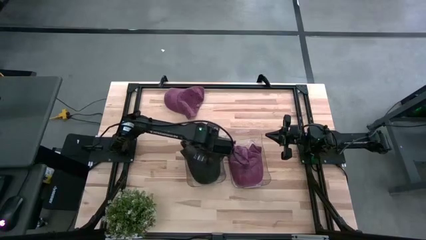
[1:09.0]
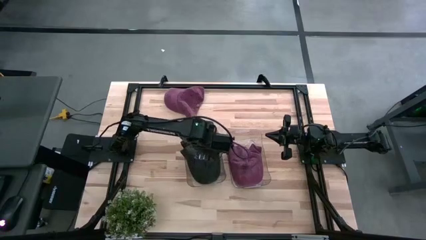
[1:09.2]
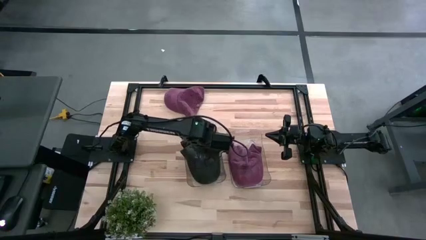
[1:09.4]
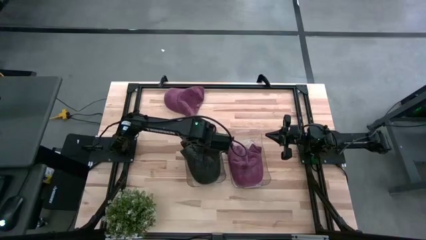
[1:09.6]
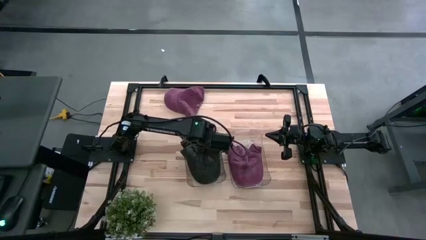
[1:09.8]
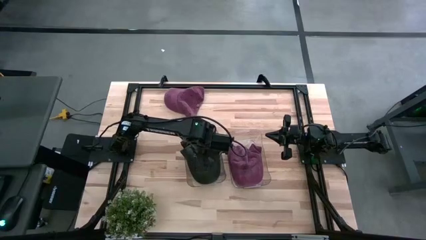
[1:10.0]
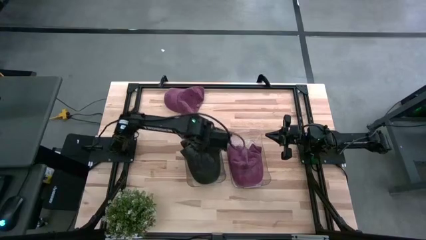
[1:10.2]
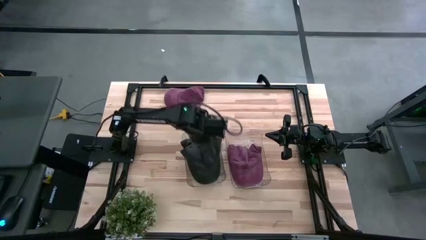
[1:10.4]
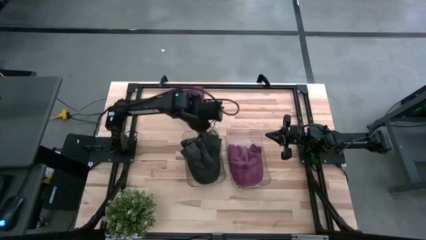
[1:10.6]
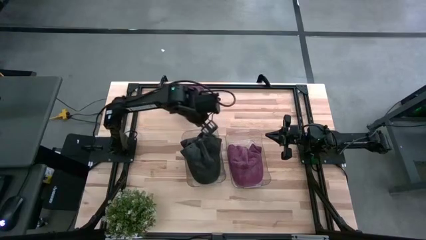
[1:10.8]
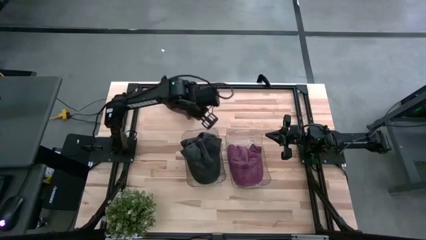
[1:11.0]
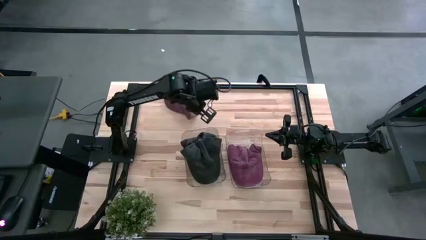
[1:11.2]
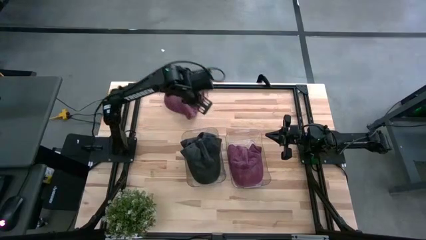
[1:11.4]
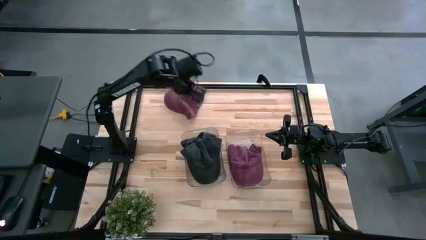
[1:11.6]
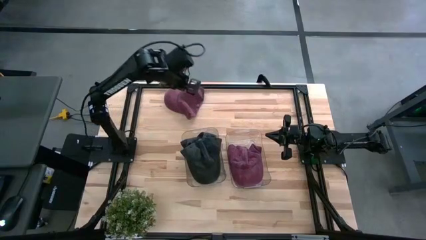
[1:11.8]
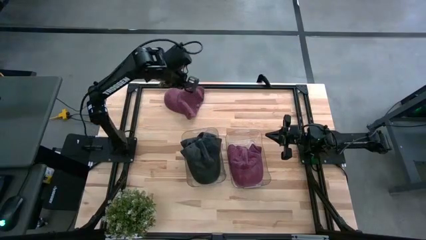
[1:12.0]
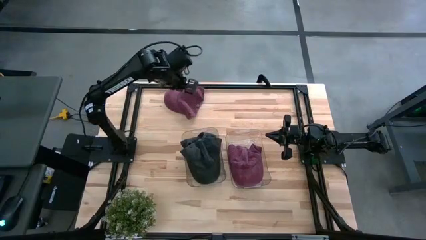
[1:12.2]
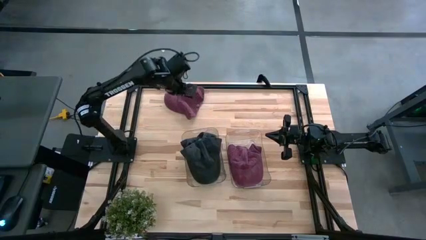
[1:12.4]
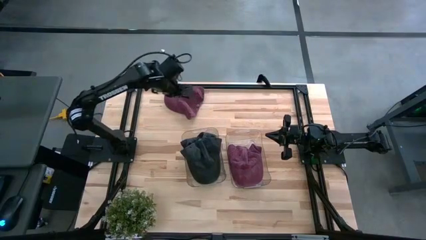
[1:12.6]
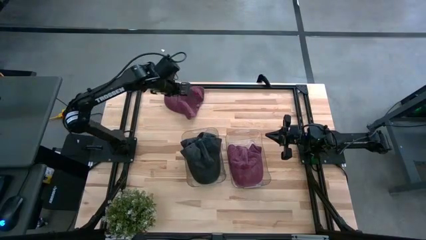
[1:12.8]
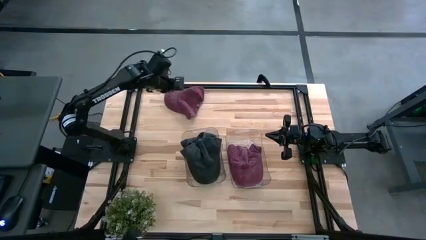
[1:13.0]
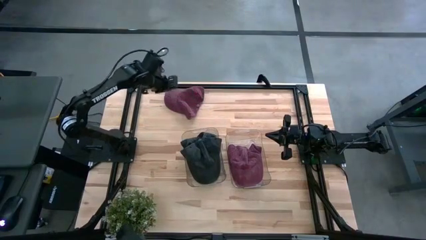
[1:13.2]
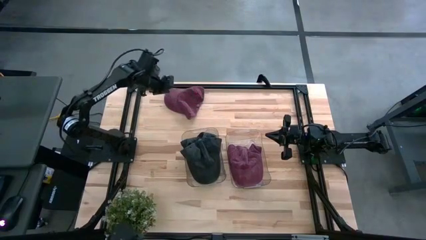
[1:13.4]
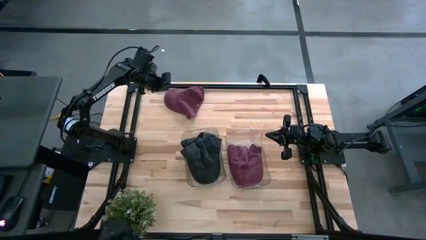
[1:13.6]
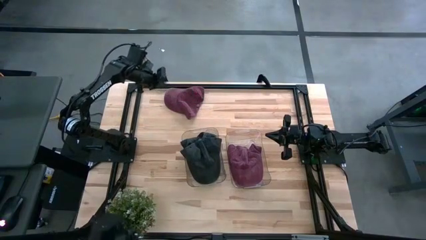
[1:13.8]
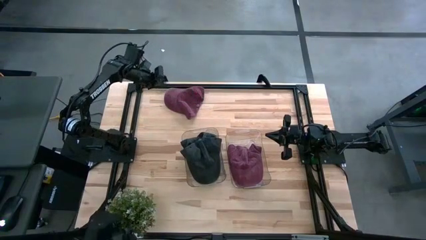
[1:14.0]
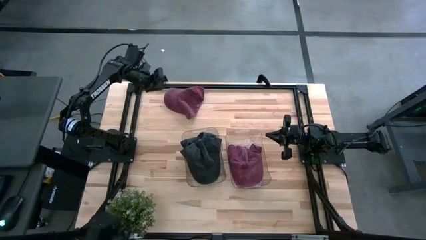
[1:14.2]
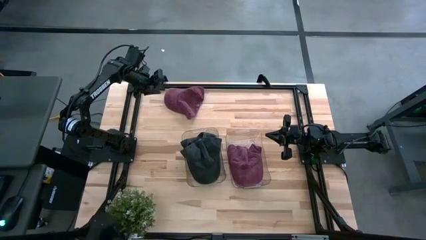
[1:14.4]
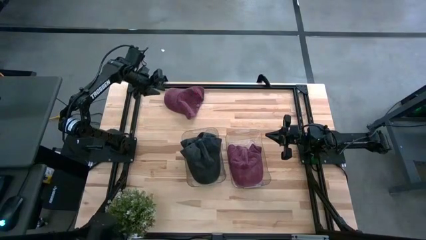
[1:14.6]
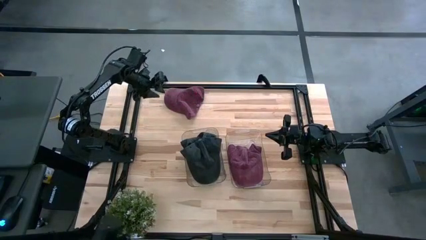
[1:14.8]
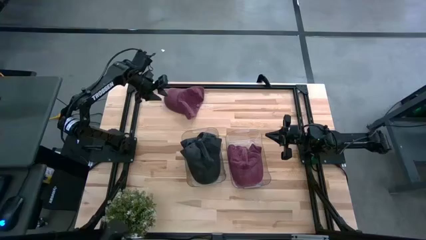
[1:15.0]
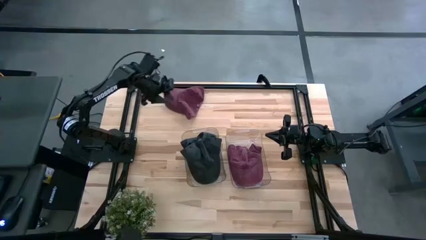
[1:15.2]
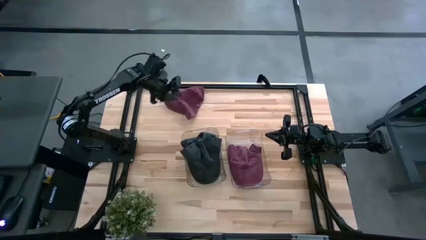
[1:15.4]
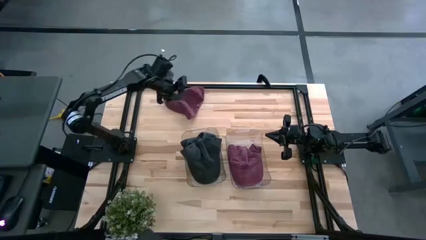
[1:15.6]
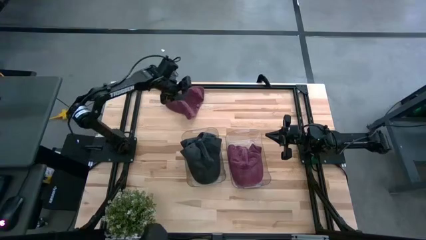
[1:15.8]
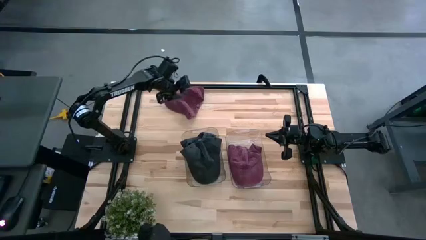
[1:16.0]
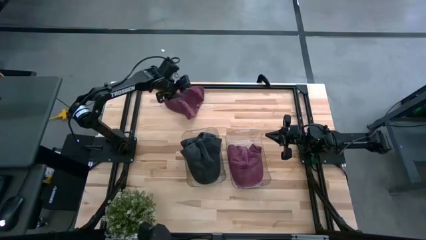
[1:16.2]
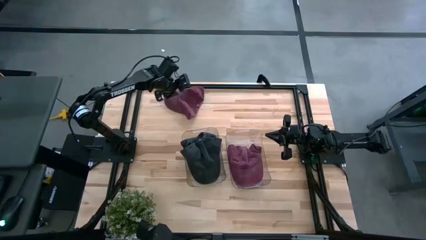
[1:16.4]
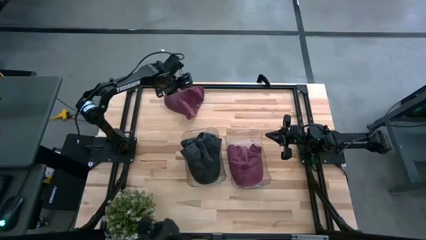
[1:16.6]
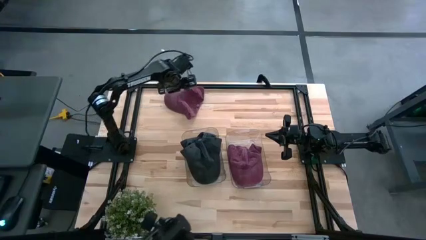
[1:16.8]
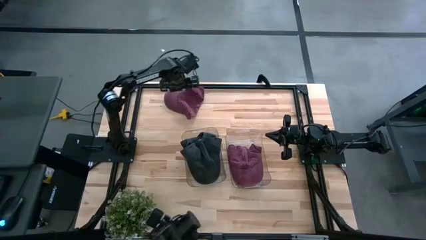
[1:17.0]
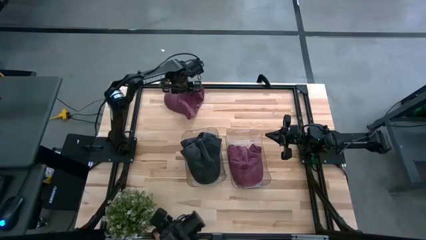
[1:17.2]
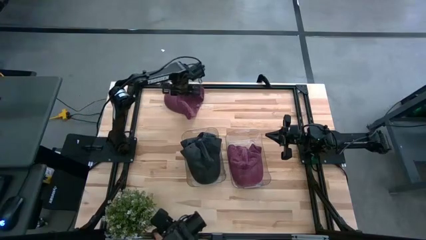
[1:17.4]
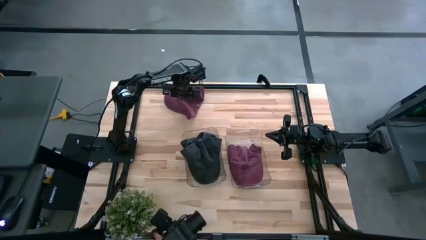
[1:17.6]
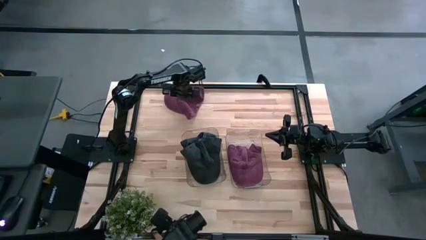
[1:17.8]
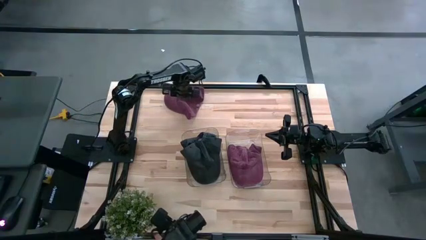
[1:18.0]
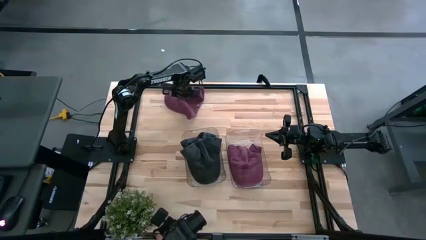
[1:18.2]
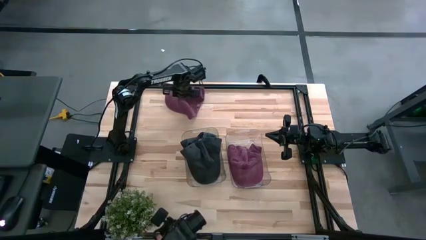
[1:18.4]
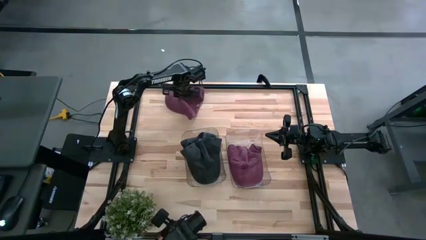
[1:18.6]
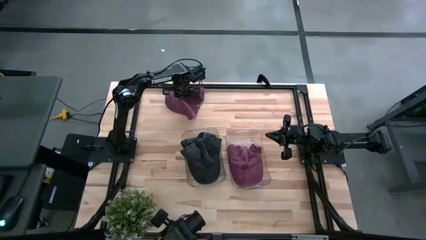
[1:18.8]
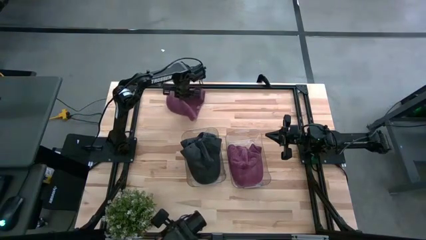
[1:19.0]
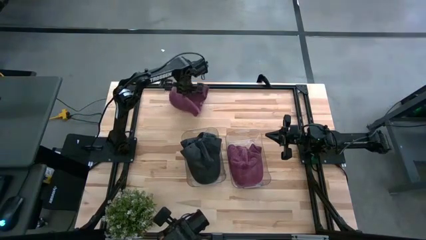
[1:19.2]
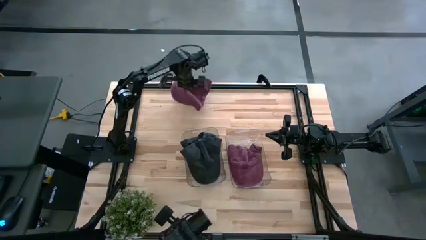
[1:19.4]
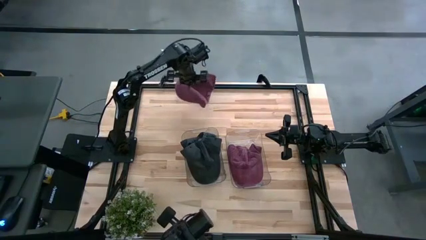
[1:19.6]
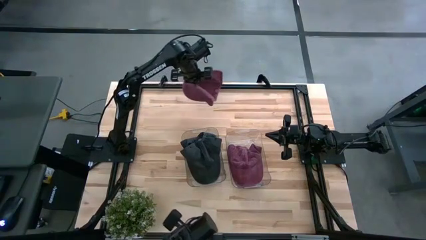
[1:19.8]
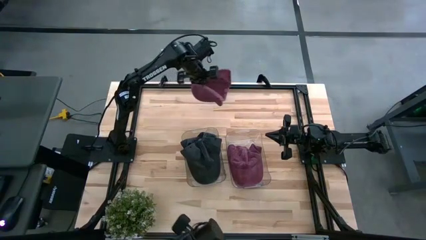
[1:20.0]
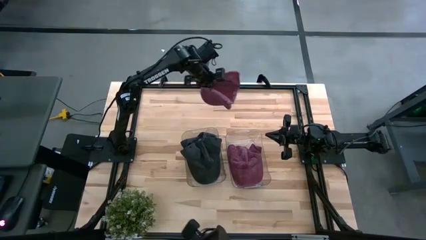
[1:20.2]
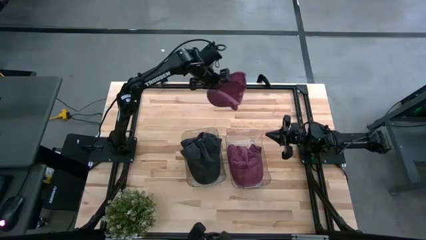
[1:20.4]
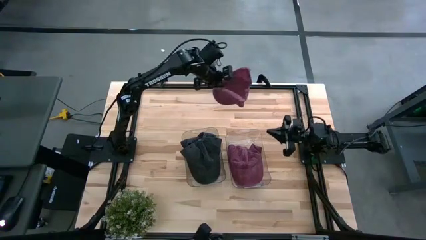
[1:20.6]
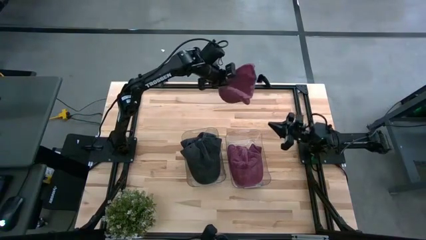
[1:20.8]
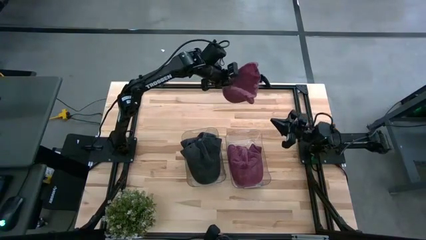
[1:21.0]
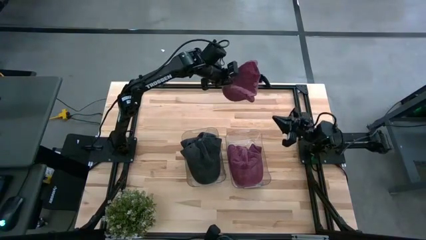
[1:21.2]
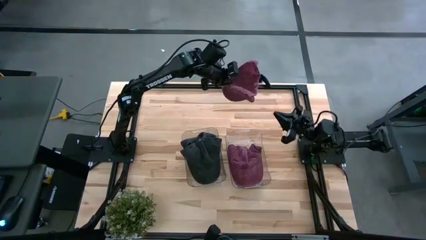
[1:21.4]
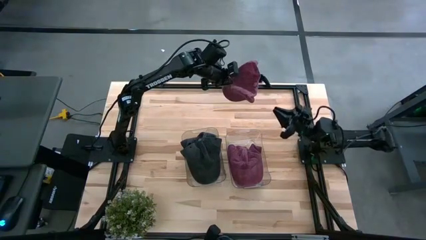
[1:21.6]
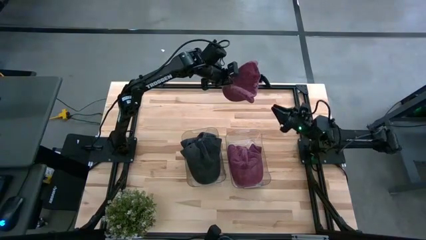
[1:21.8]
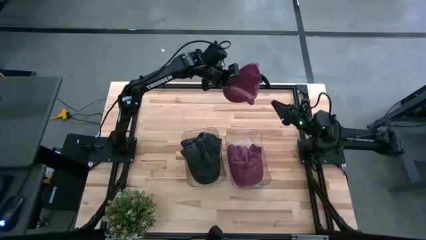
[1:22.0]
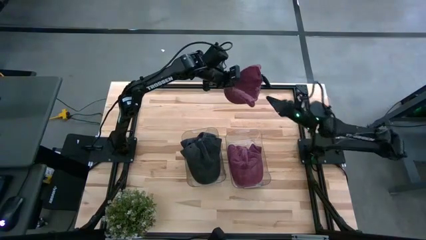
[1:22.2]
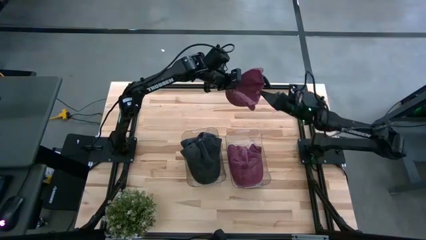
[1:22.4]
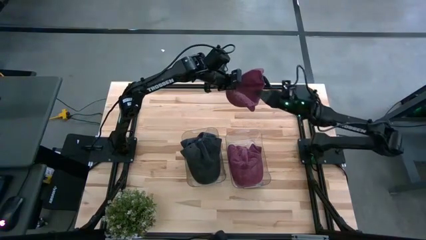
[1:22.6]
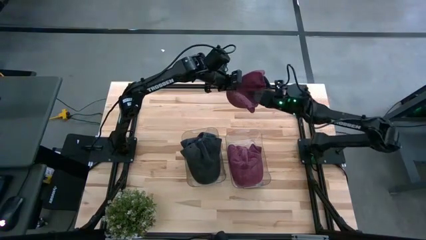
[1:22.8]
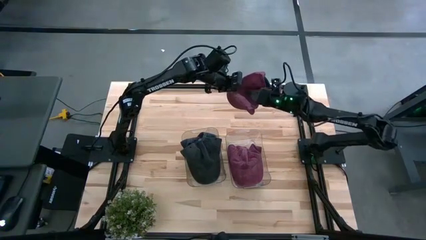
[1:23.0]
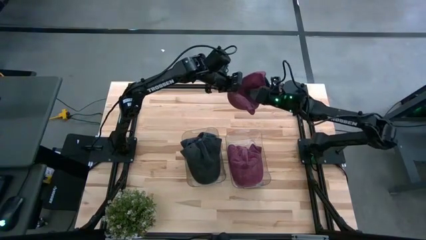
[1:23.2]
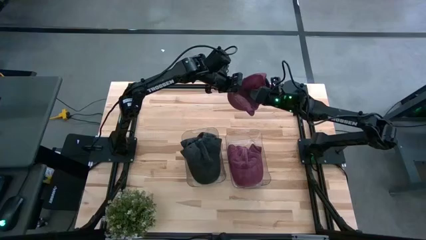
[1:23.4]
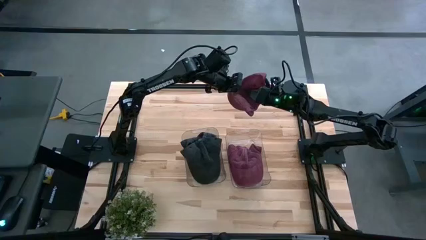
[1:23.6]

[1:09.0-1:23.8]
Task: Pick & Place hat
Put the red cap into the right transparent bin
